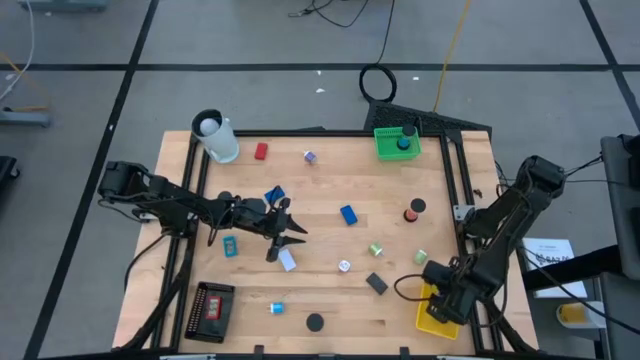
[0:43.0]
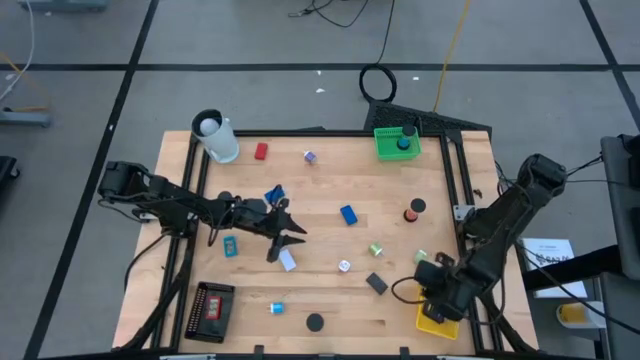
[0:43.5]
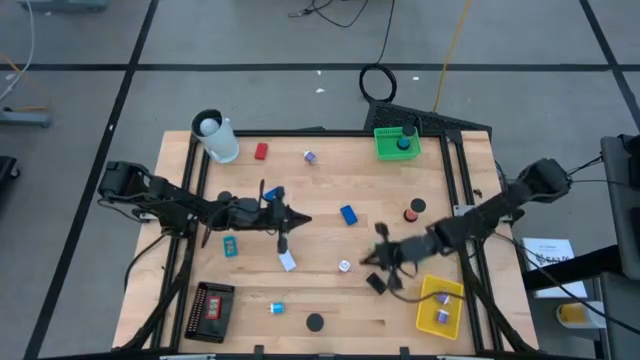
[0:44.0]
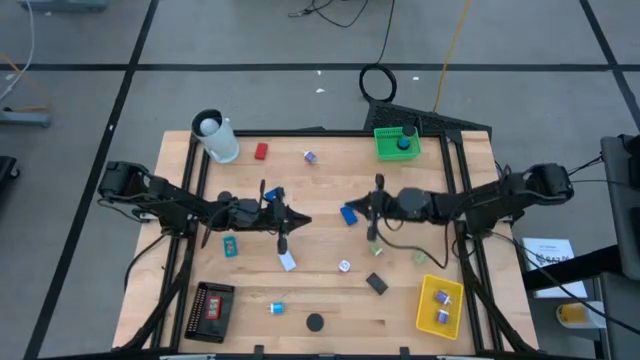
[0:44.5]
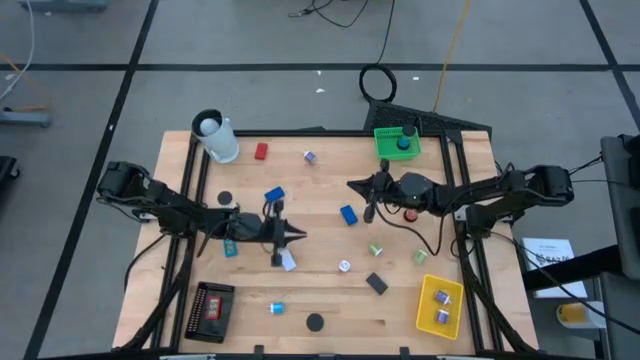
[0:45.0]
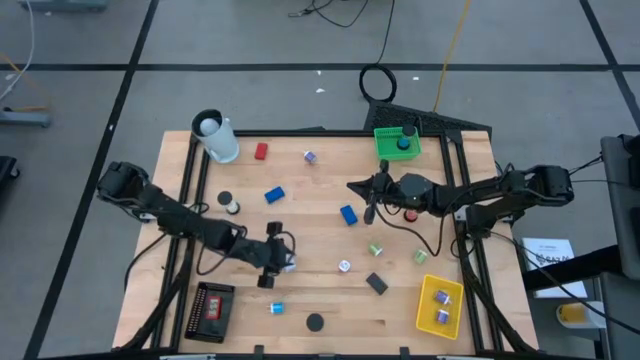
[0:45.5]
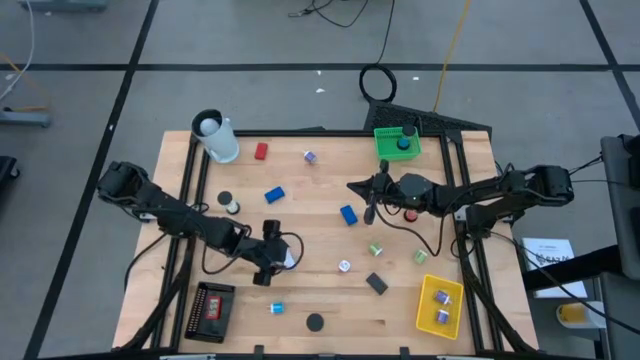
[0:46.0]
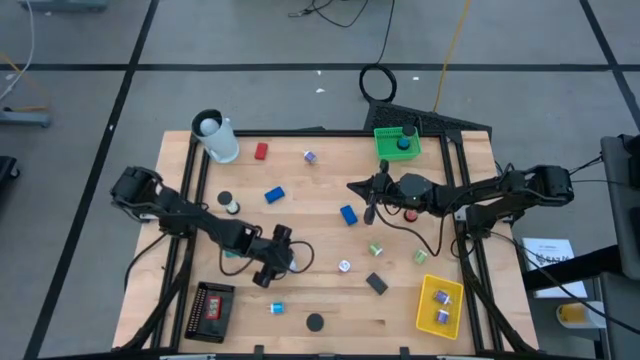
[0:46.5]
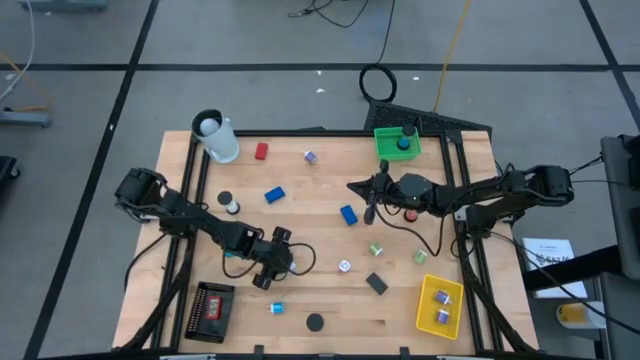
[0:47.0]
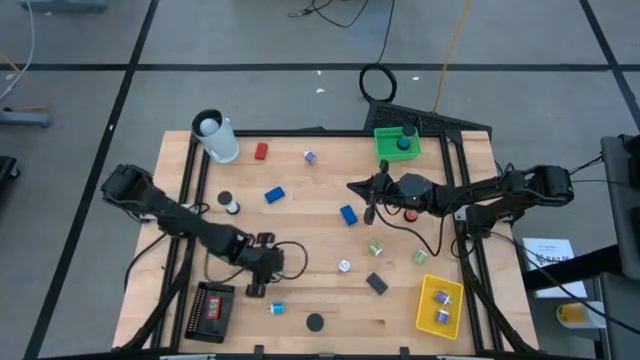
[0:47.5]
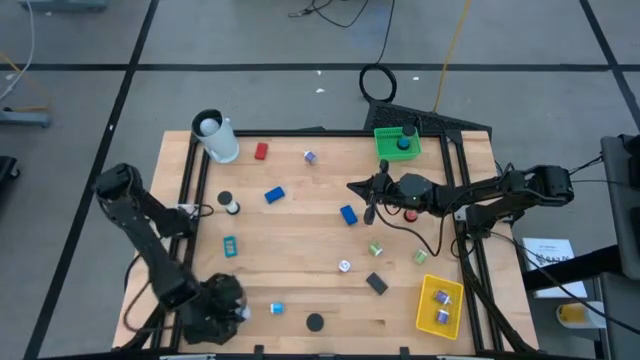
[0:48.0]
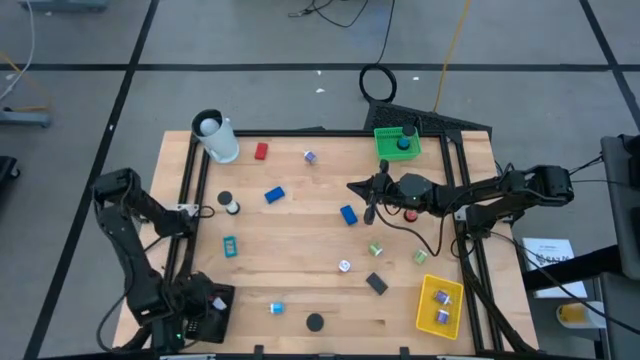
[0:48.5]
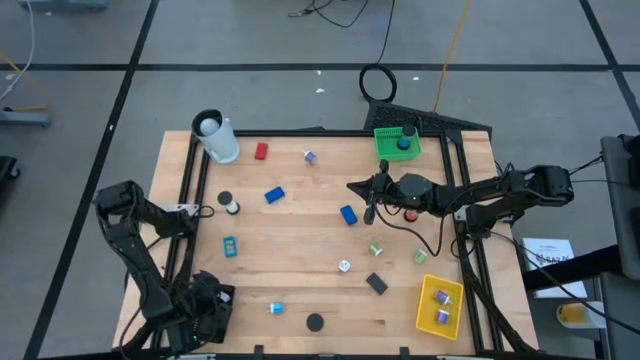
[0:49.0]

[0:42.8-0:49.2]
Task: Pick & Place Office items
Put the white digital clock into the black bin

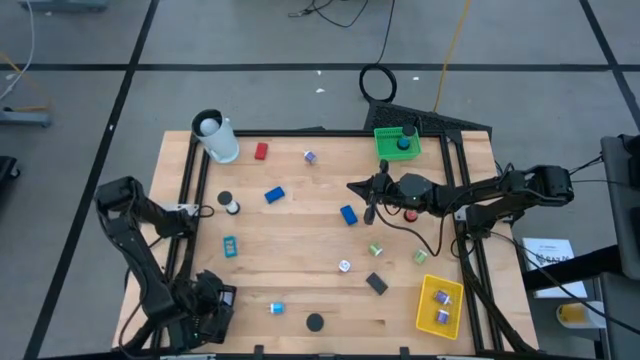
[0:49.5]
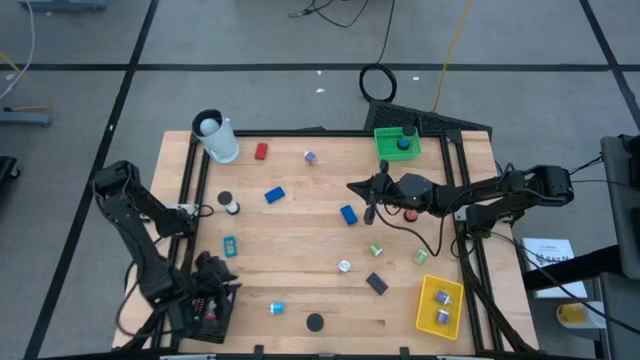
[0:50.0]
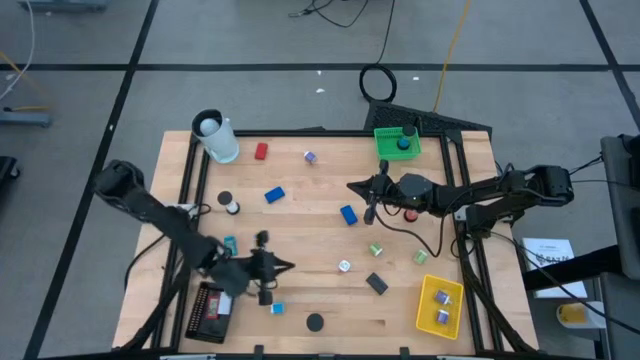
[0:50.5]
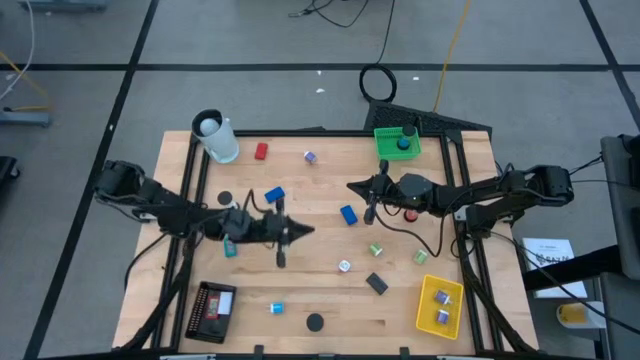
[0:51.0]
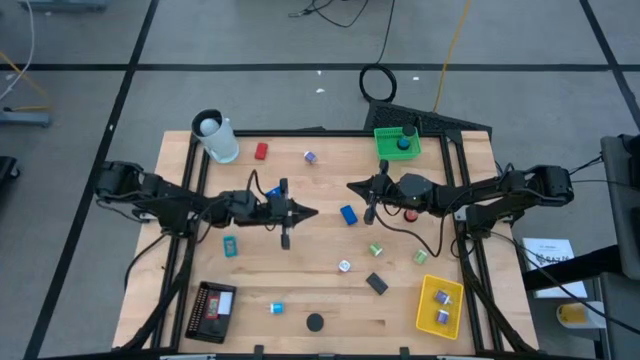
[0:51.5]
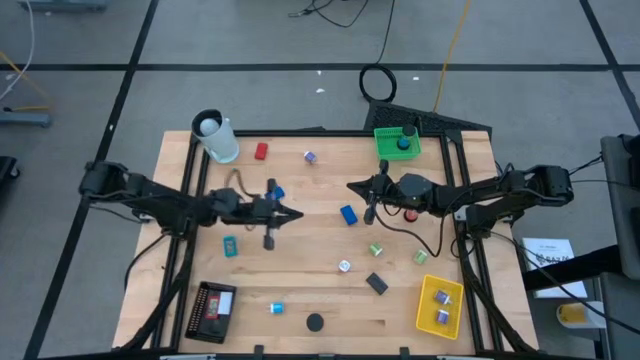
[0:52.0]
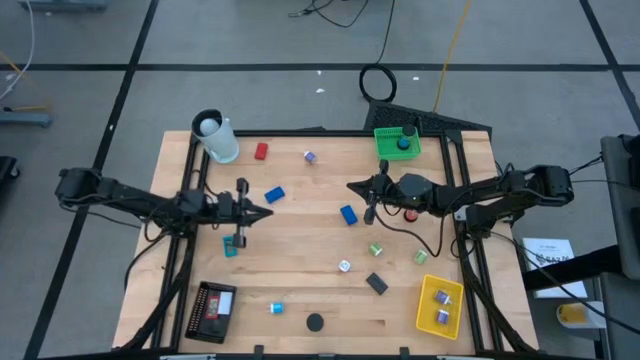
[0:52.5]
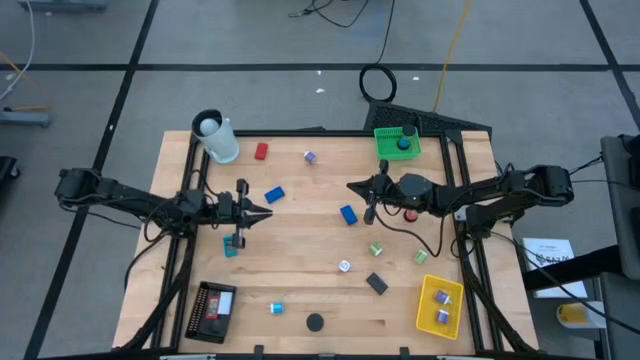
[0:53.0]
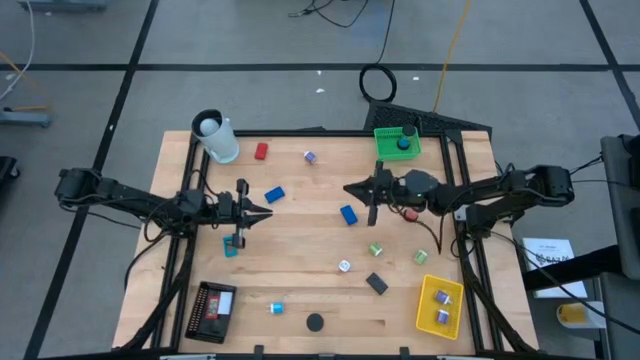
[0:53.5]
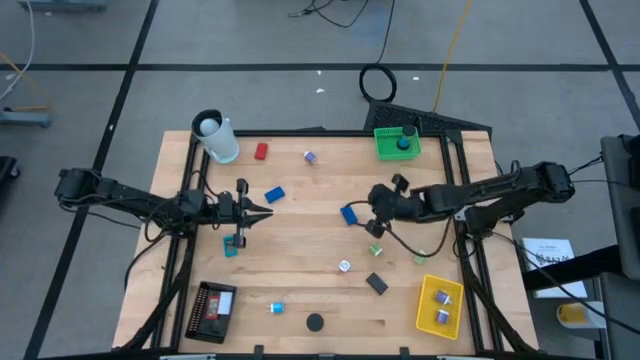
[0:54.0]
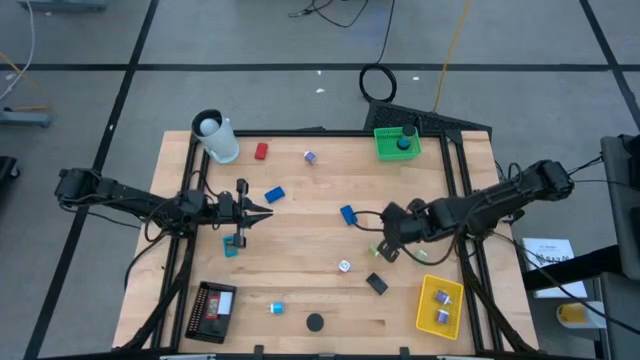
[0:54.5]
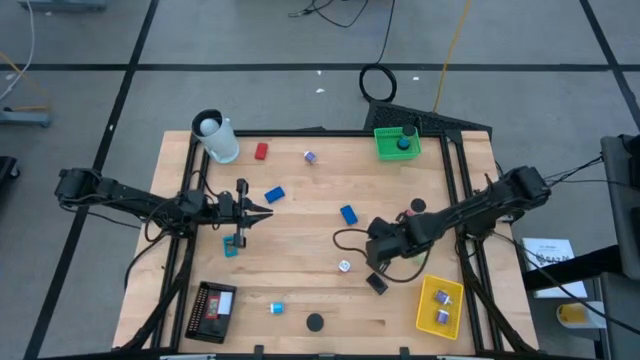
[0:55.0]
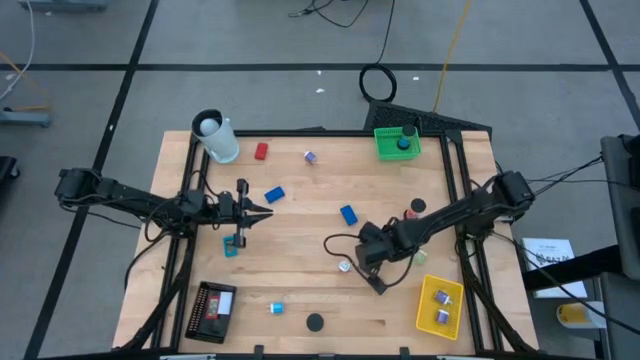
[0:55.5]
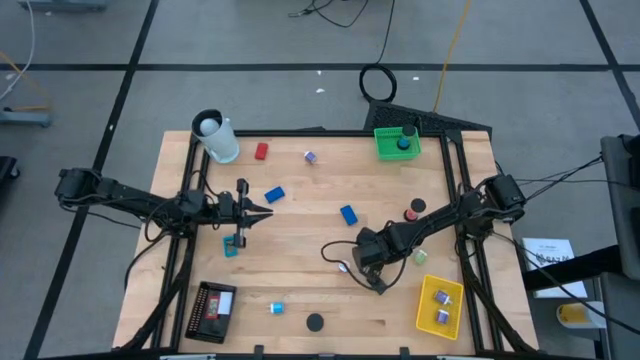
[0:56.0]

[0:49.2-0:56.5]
Put the left green charger adapter into the yellow bin

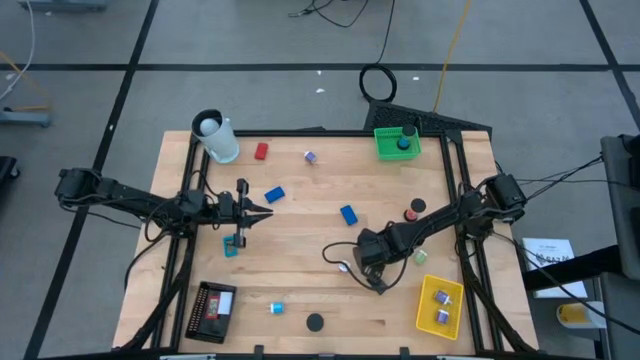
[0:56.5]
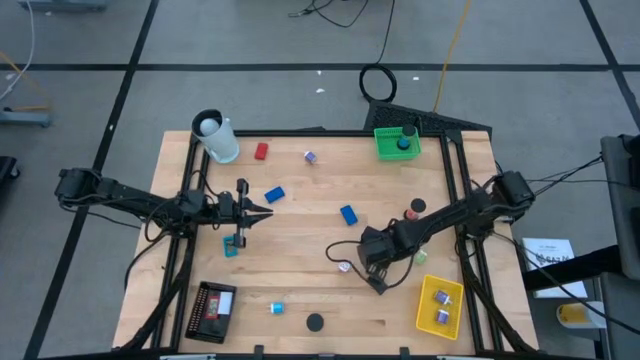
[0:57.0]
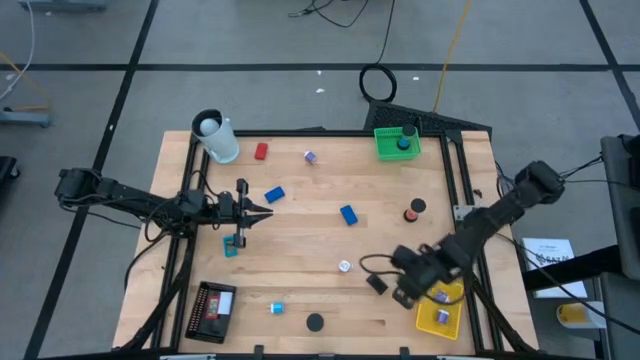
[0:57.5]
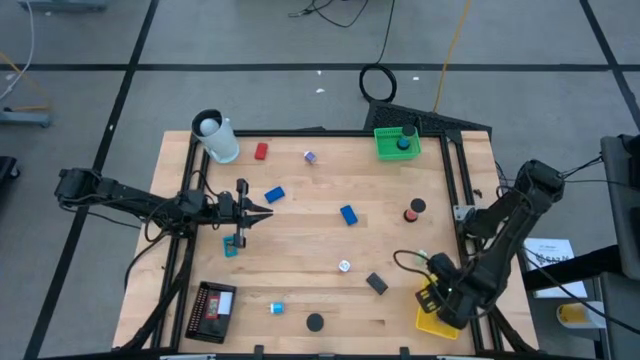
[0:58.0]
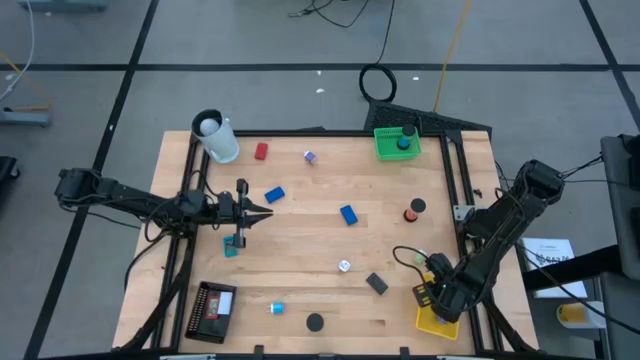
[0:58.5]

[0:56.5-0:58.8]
Put the left green charger adapter into the yellow bin

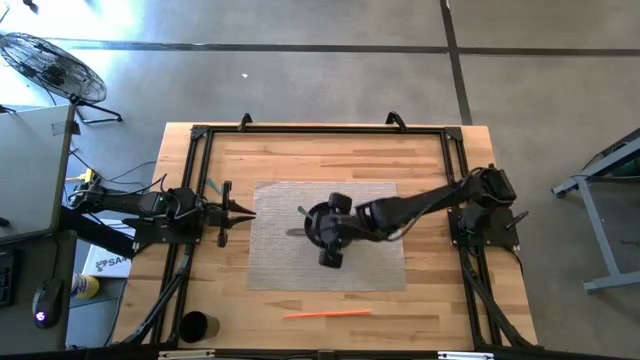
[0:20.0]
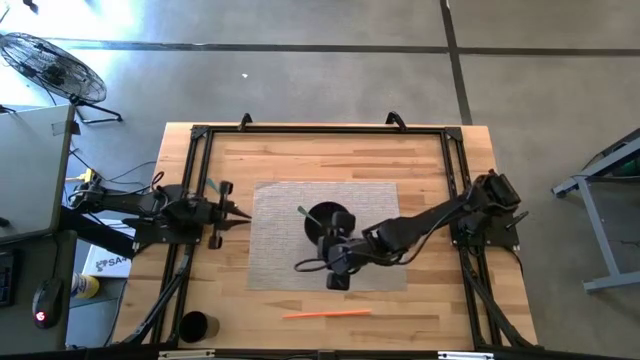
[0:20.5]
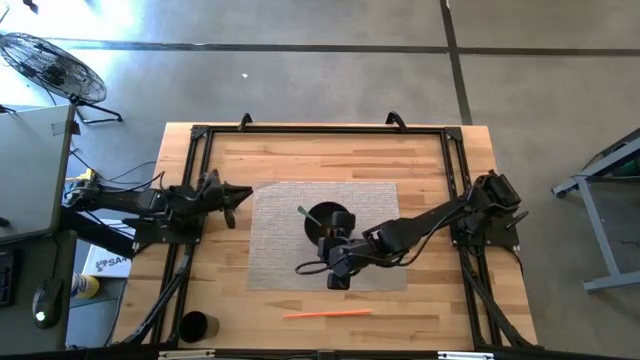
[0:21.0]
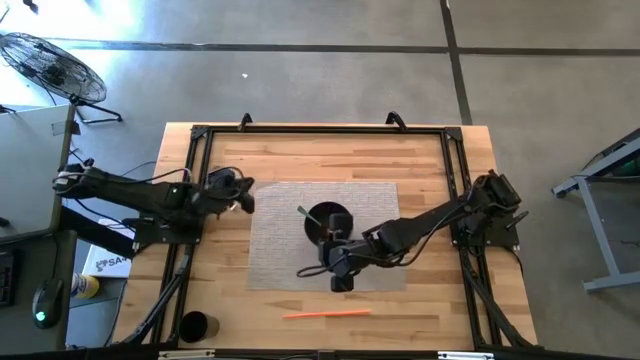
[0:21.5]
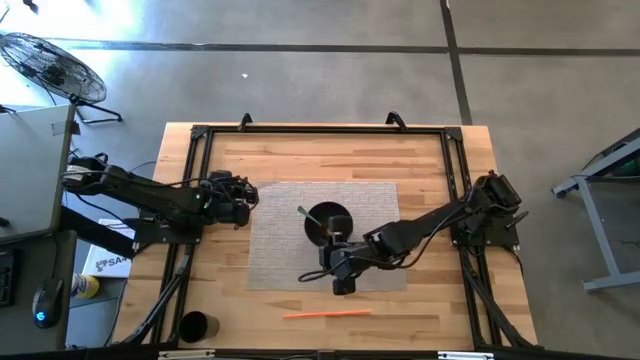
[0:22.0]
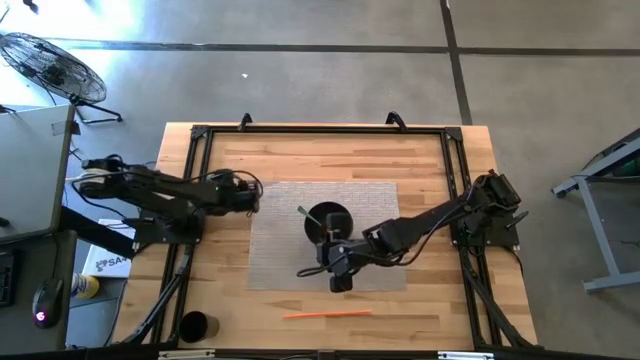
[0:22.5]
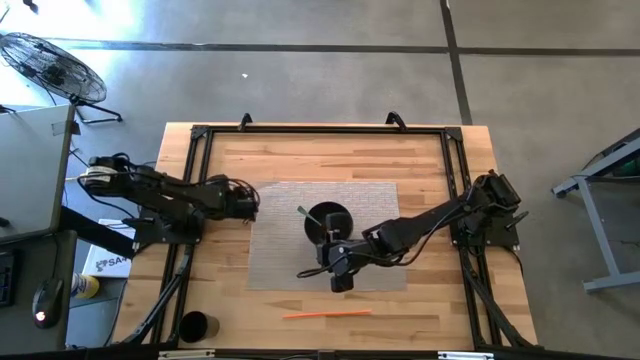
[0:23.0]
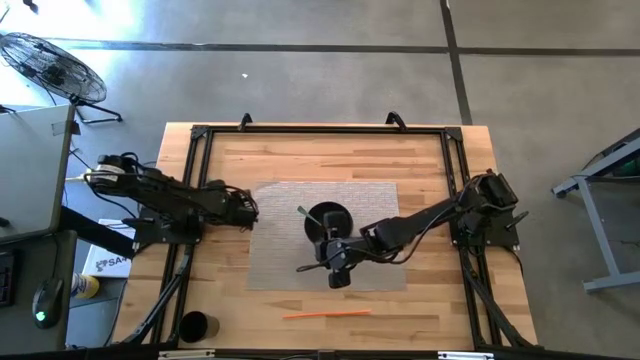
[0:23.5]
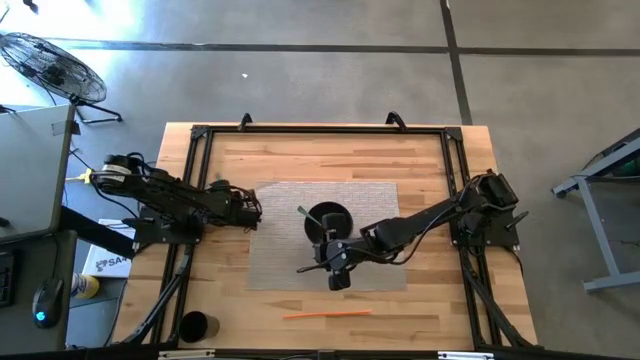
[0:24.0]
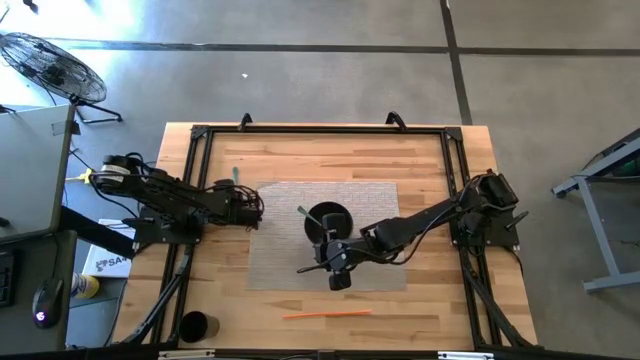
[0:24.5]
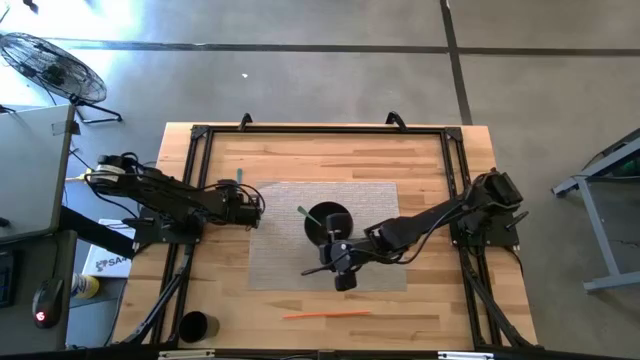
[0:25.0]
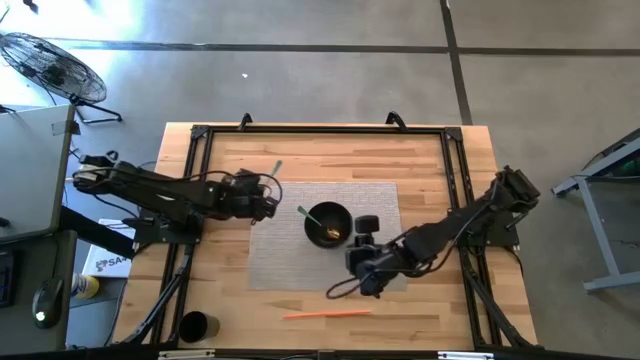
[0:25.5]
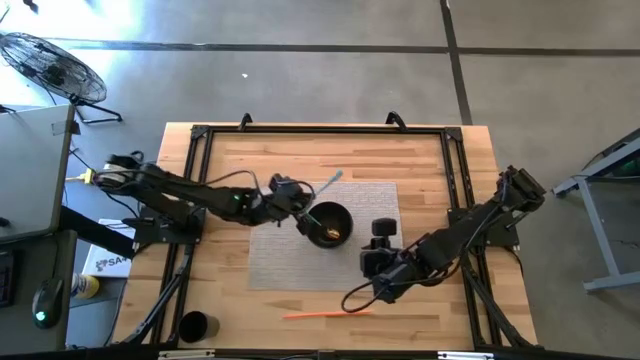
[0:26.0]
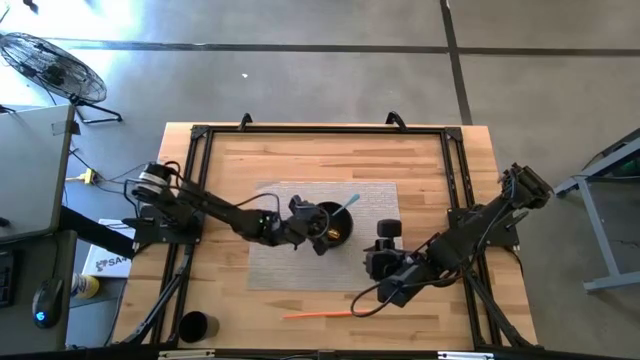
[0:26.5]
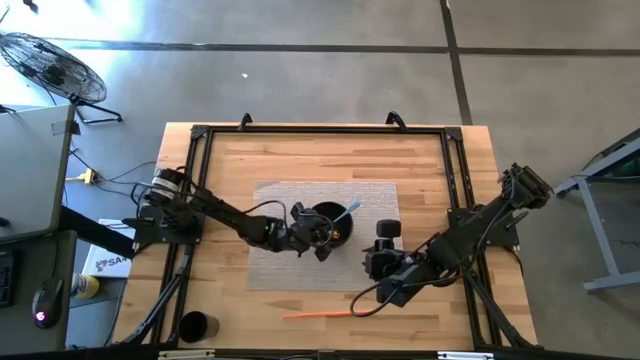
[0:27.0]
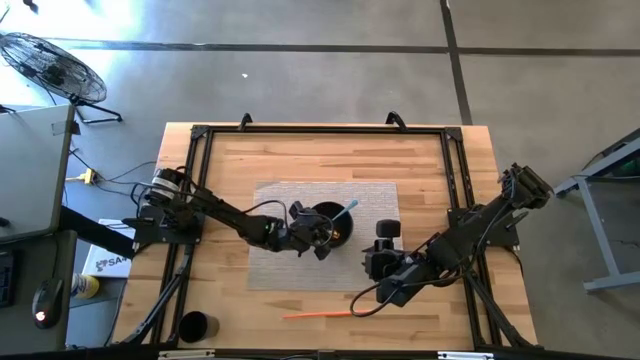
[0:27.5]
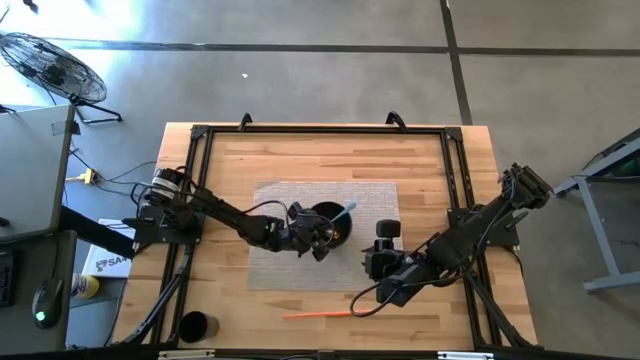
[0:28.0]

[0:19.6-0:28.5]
Task: Pick & Place Utensil
Put the blue fork into the black bowl on the gray mat
